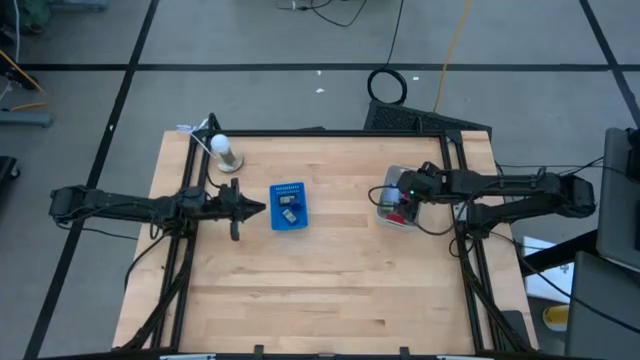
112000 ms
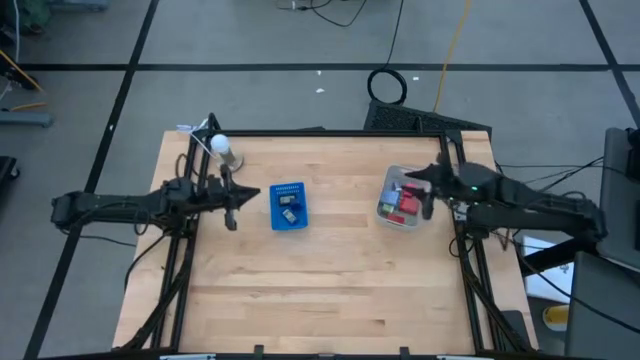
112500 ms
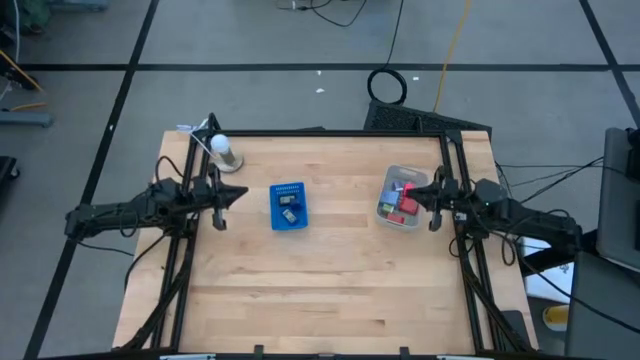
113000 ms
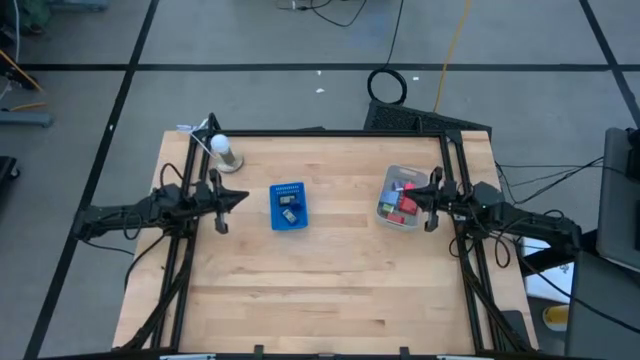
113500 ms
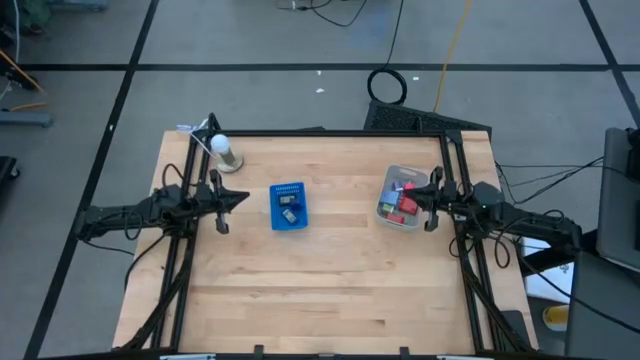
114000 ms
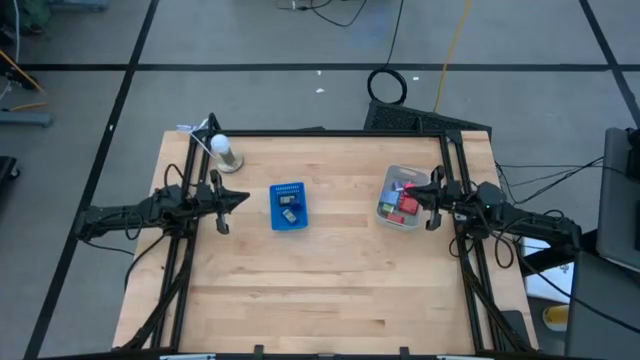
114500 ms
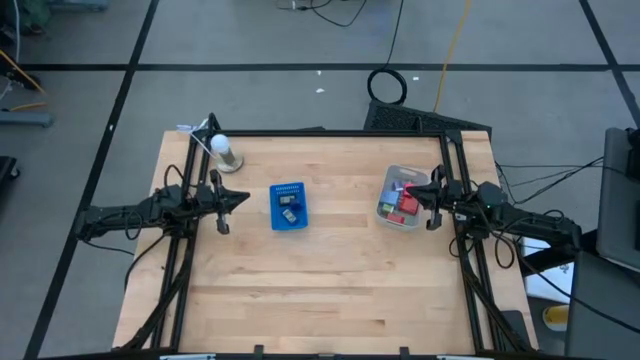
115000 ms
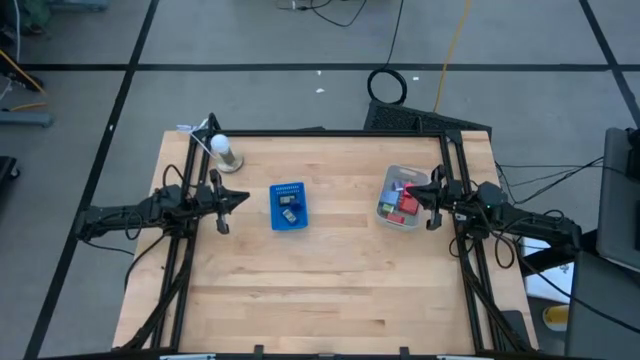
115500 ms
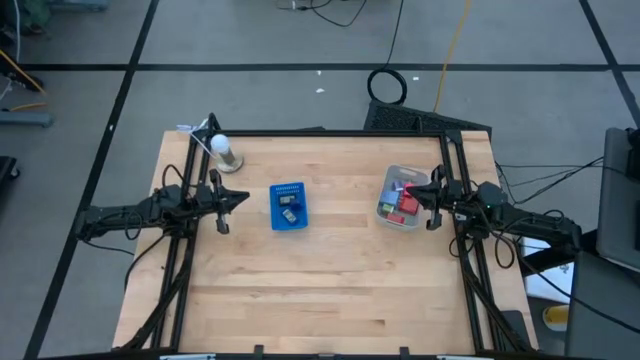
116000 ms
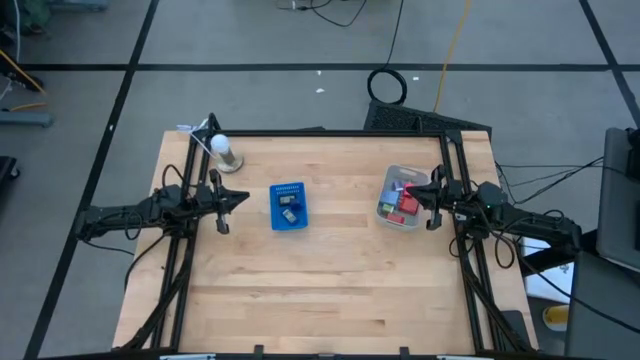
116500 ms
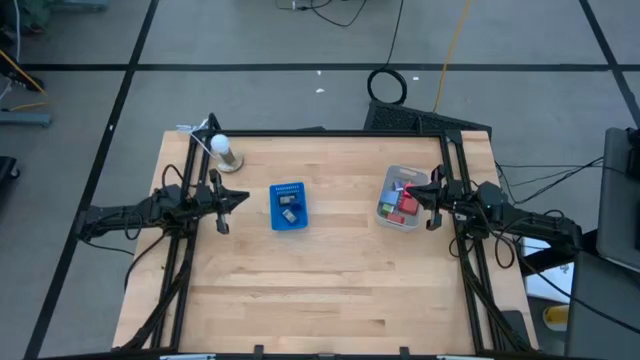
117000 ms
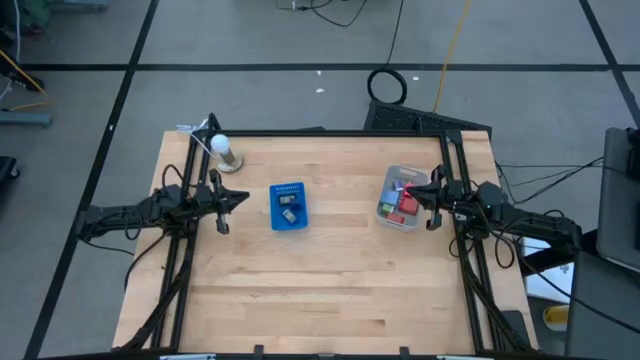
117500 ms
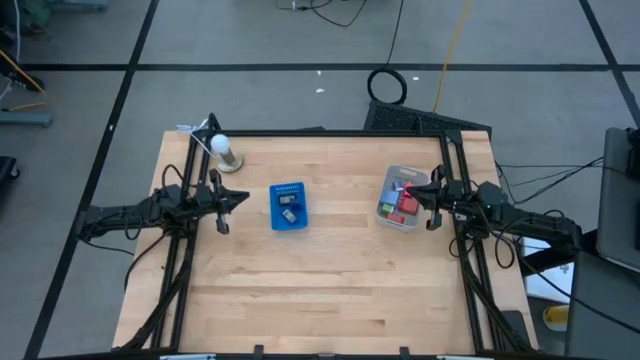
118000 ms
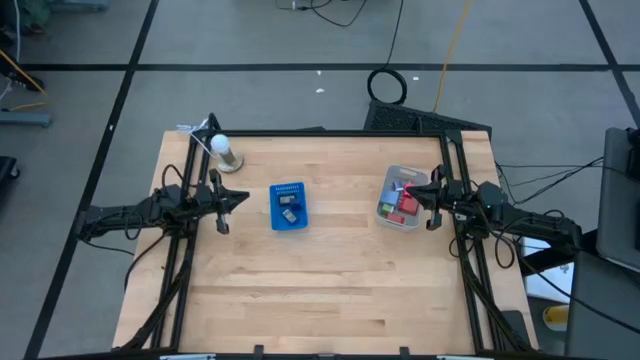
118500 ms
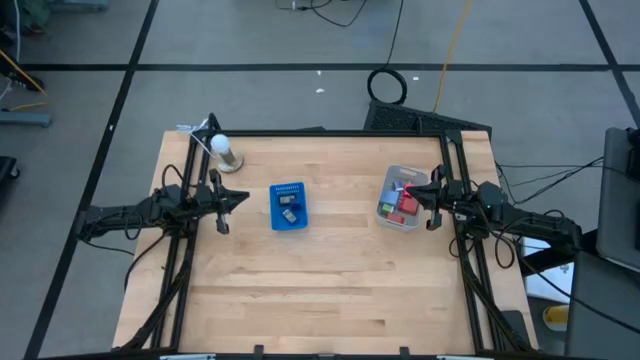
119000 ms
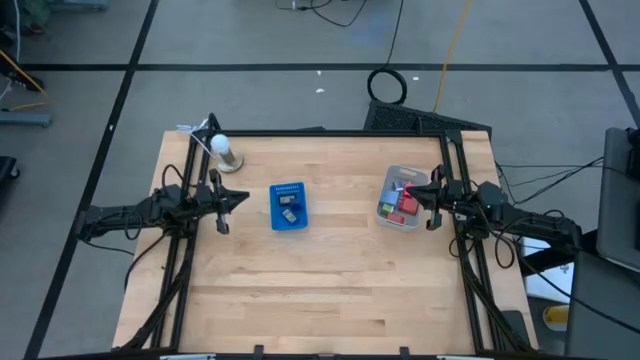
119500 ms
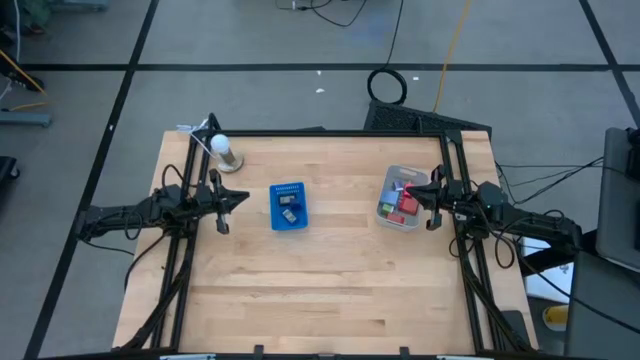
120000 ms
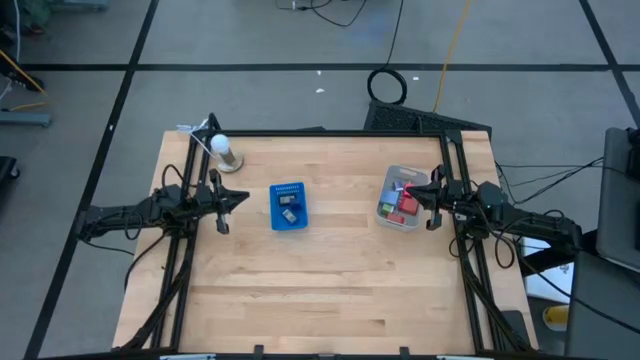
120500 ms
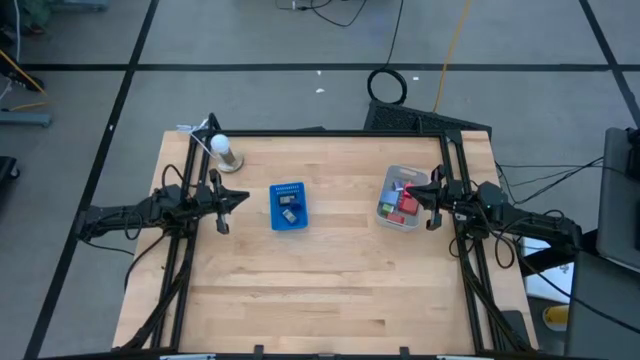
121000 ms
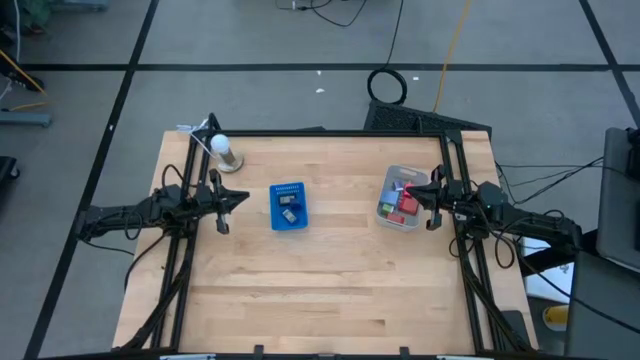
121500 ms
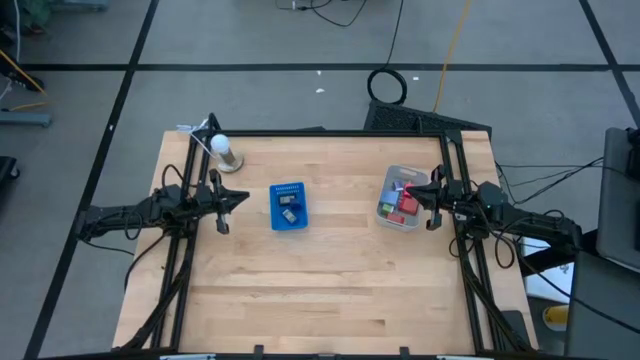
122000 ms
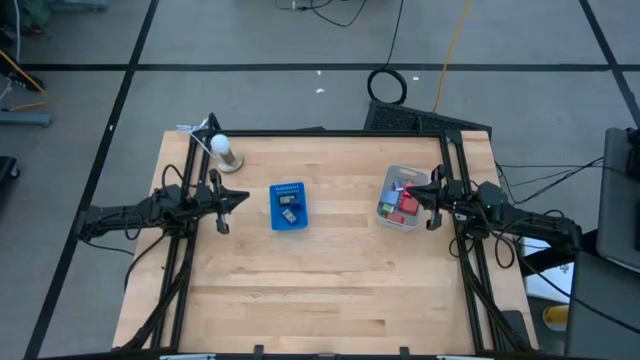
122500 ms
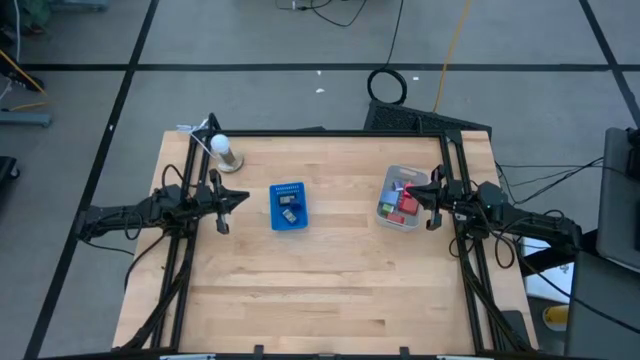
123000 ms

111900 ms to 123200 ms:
Task: Pick & Place Office items
Return to Home Position

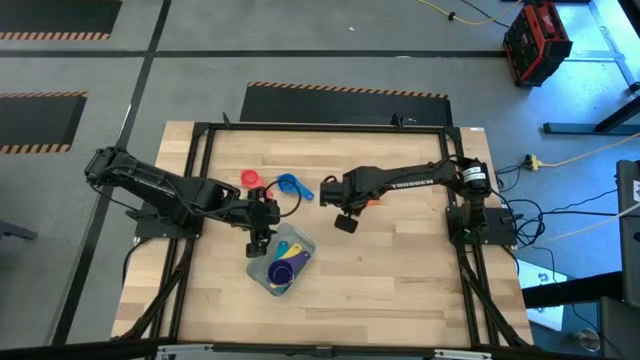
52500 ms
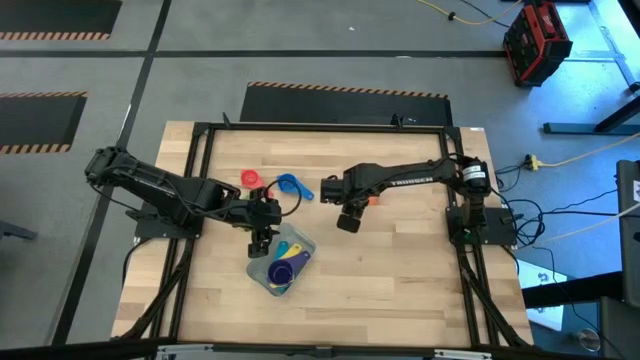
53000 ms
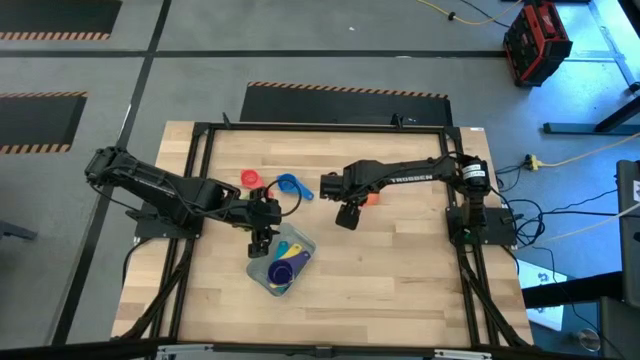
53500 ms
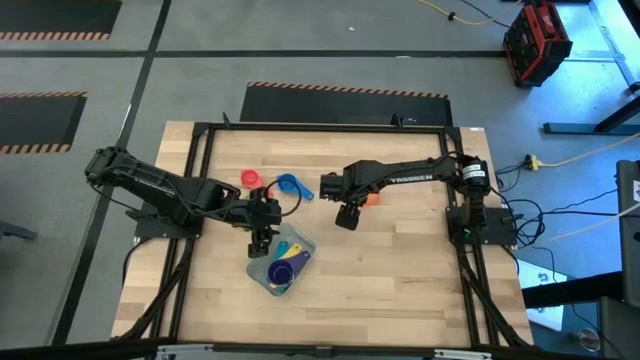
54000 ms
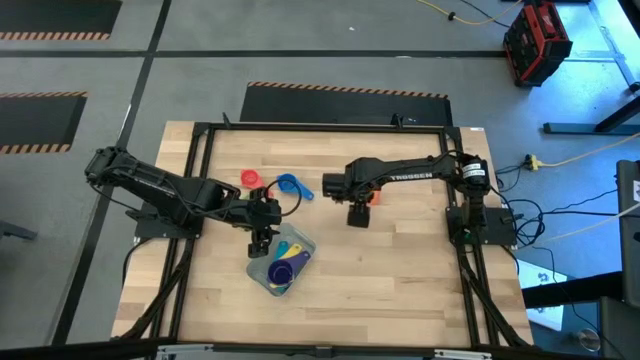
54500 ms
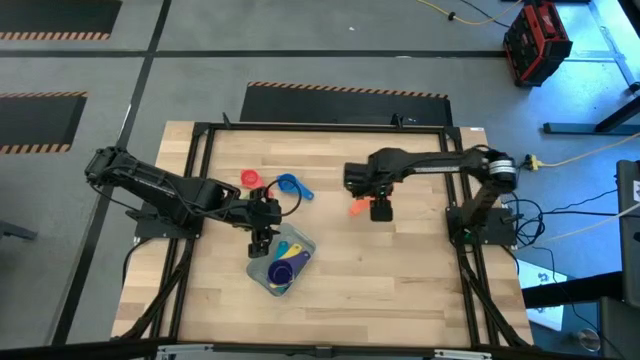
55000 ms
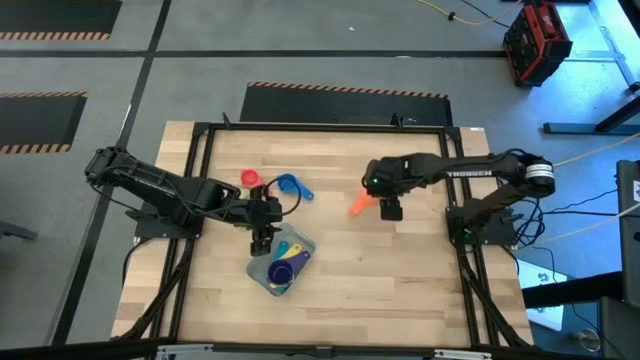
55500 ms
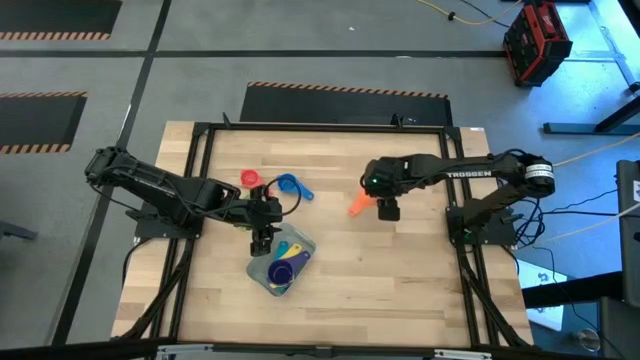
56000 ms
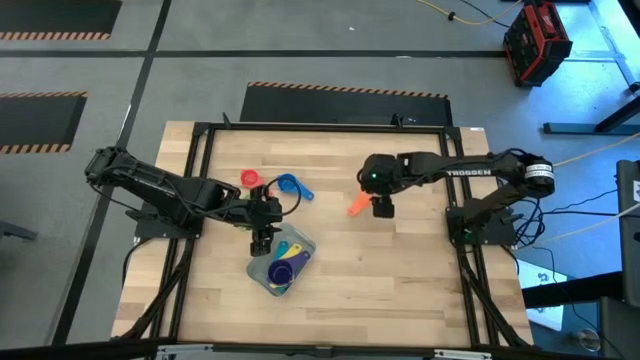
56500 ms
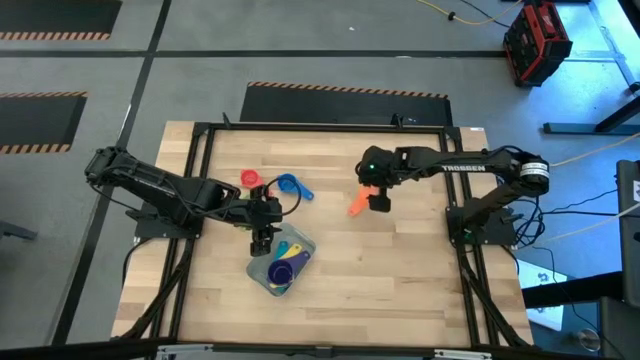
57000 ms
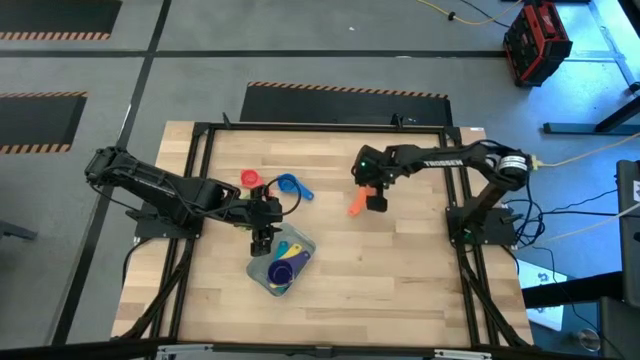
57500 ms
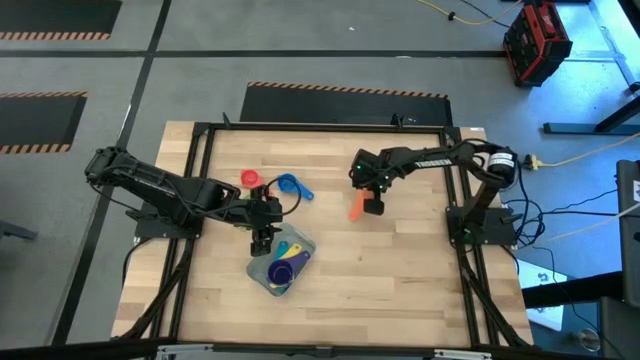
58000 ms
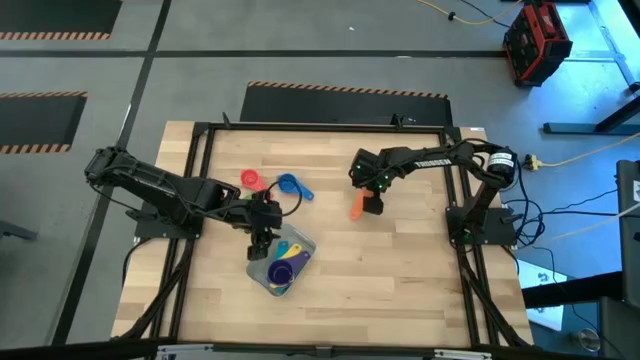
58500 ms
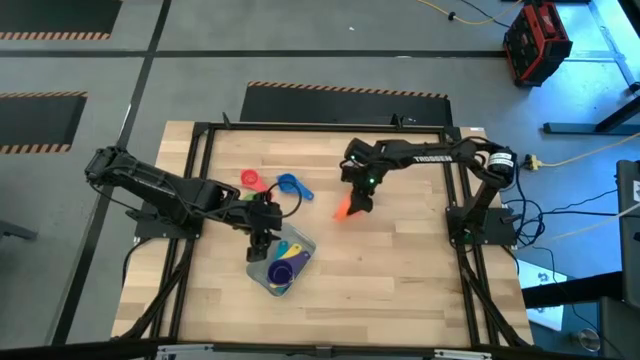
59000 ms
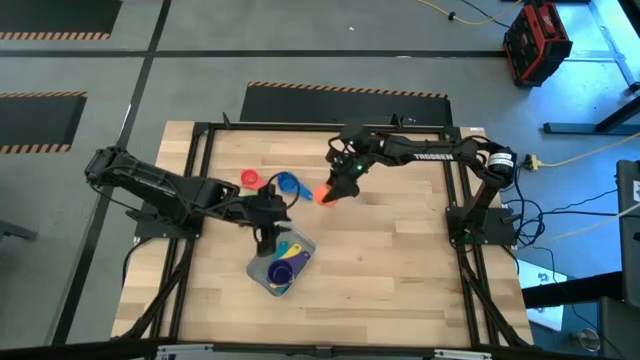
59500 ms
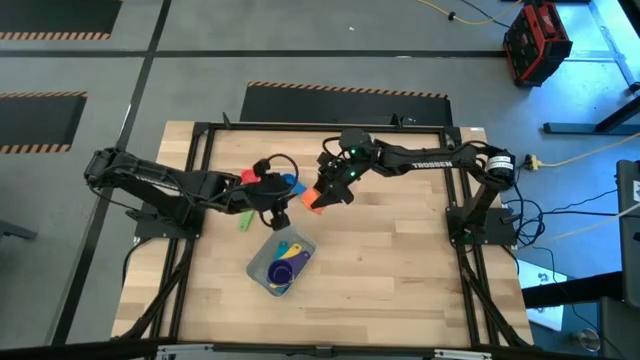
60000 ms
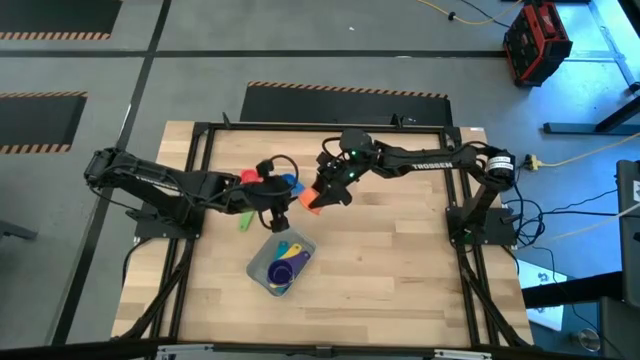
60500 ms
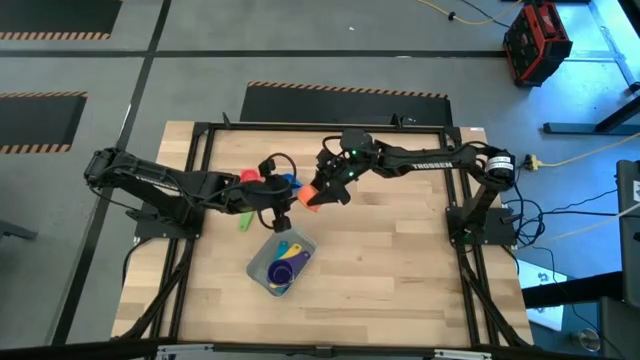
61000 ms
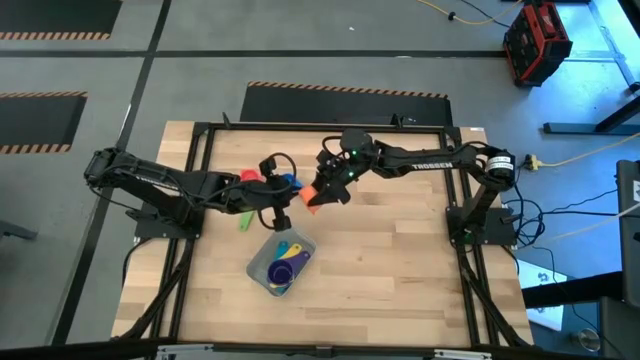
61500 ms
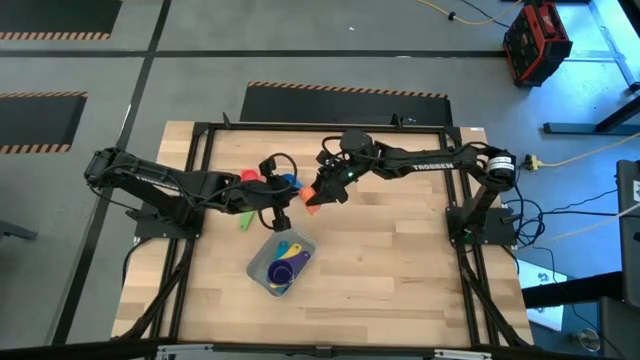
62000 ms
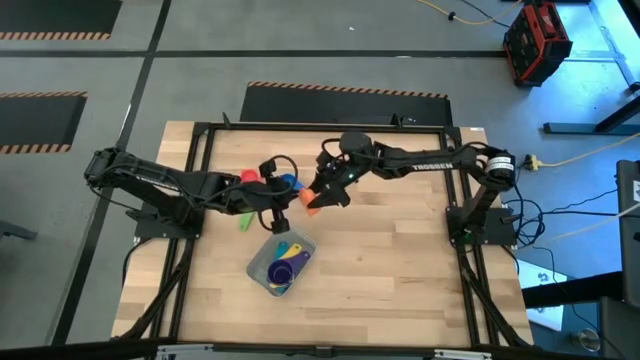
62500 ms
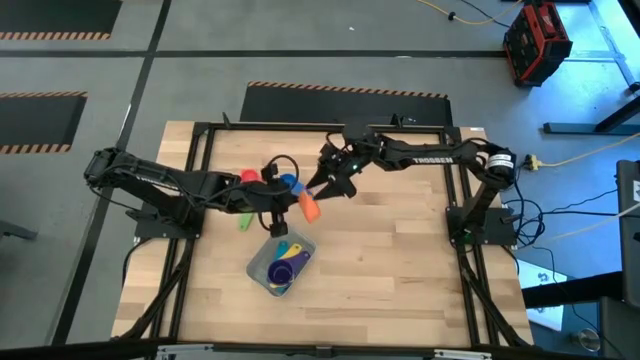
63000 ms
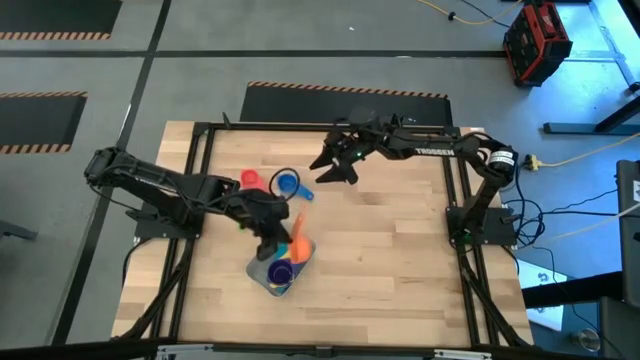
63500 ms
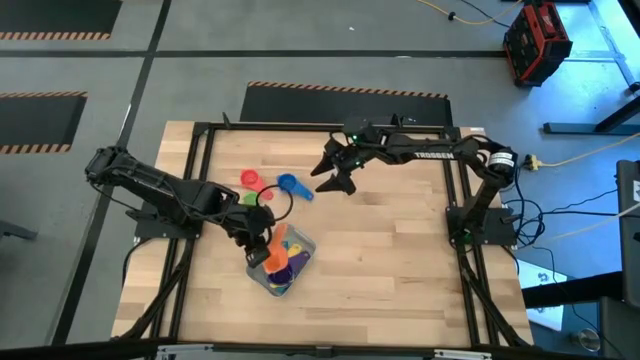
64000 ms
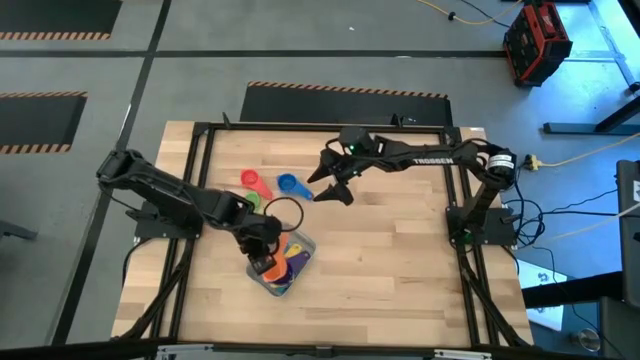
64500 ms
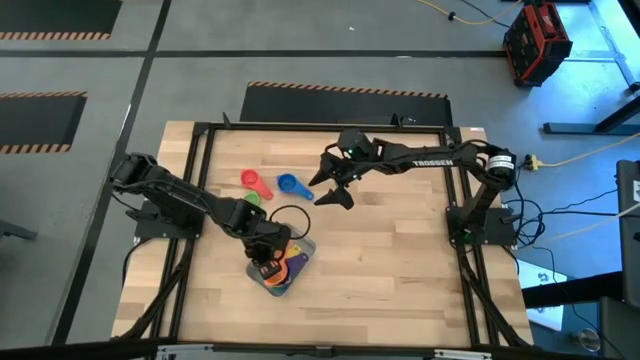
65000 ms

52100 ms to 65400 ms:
Task: Nest measuring cups in basket
Stack the orange measuring cup into the purple measuring cup in the grey bin
